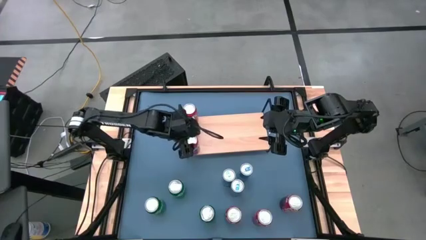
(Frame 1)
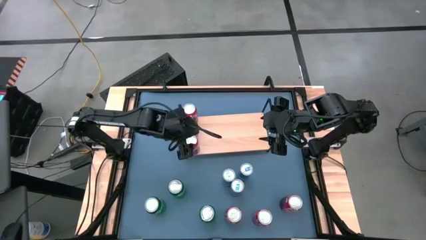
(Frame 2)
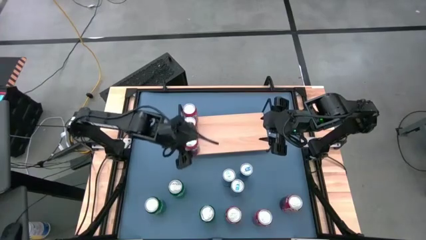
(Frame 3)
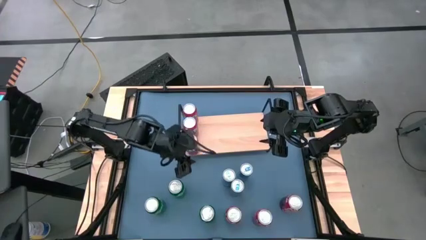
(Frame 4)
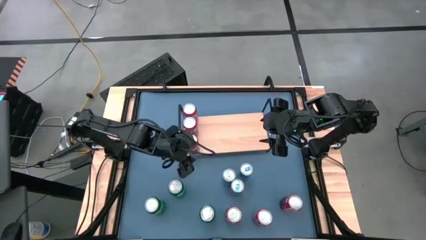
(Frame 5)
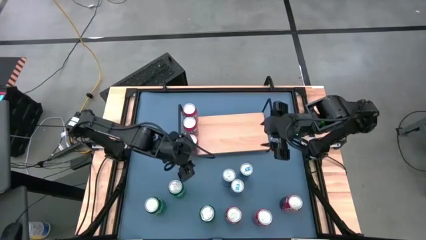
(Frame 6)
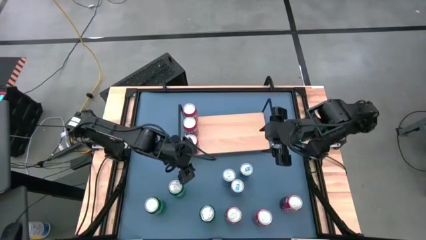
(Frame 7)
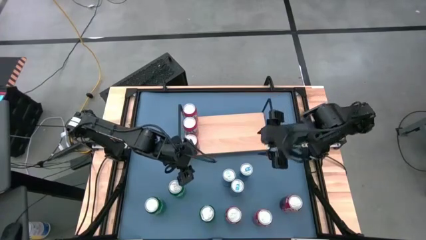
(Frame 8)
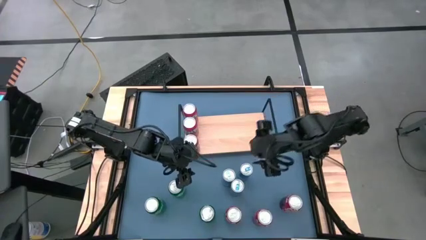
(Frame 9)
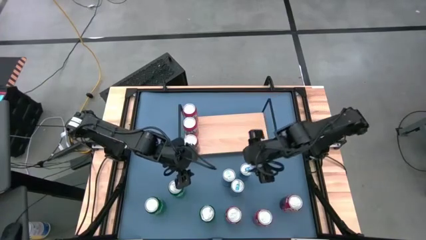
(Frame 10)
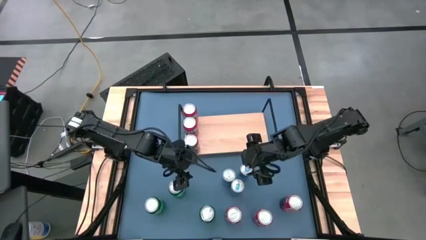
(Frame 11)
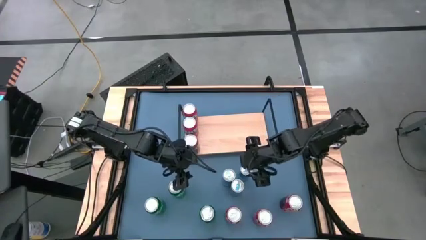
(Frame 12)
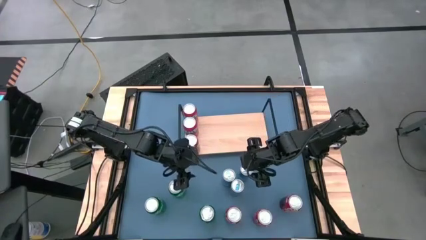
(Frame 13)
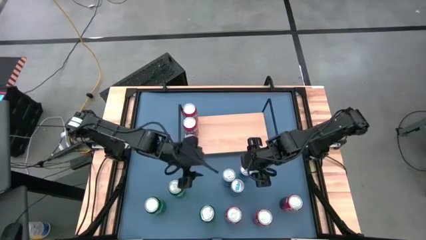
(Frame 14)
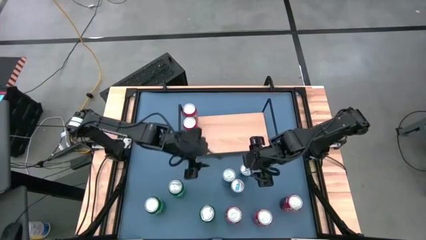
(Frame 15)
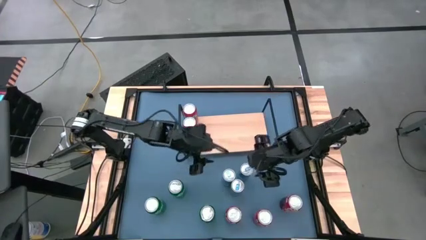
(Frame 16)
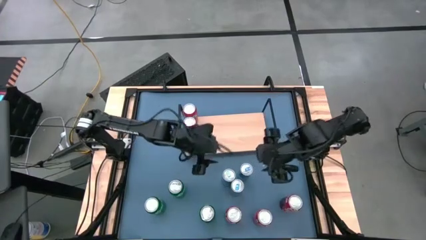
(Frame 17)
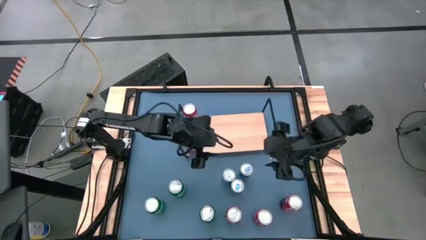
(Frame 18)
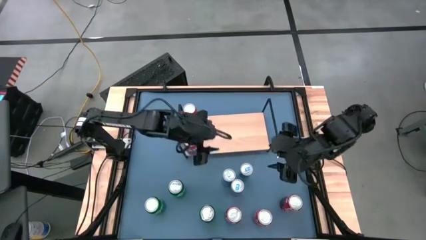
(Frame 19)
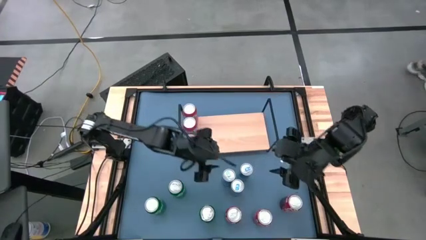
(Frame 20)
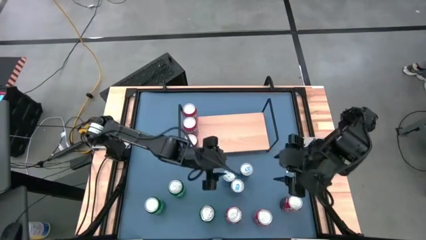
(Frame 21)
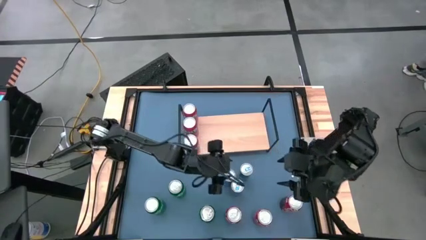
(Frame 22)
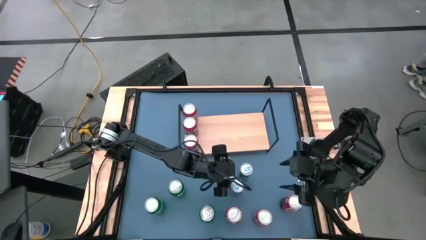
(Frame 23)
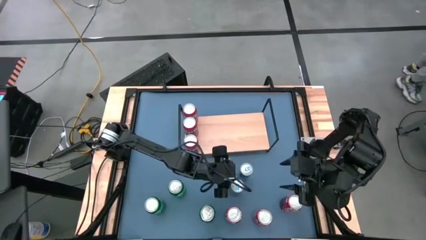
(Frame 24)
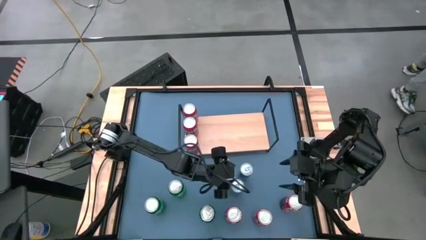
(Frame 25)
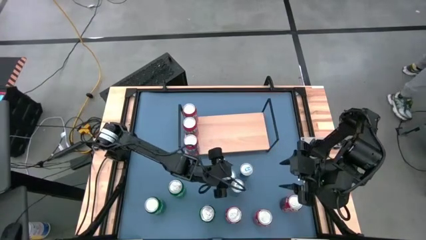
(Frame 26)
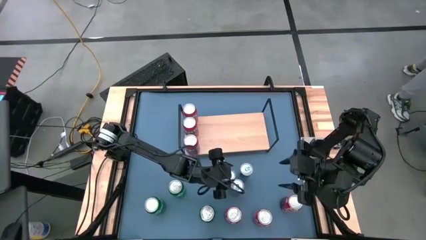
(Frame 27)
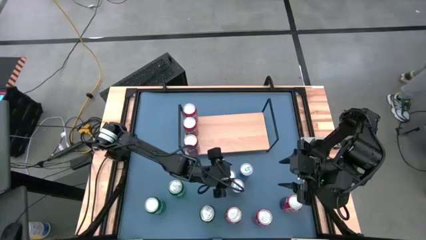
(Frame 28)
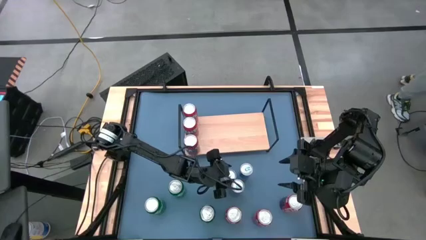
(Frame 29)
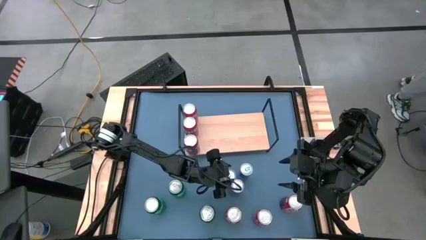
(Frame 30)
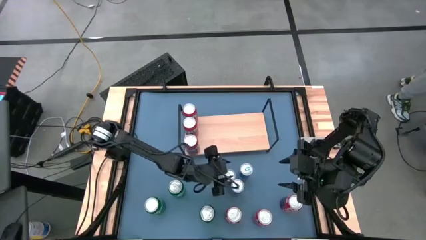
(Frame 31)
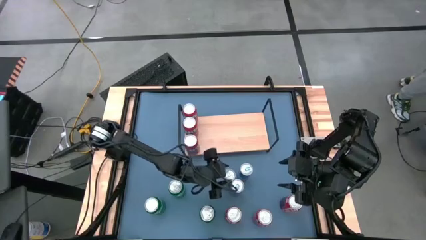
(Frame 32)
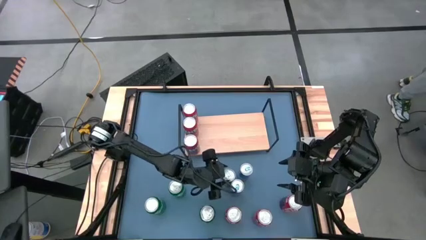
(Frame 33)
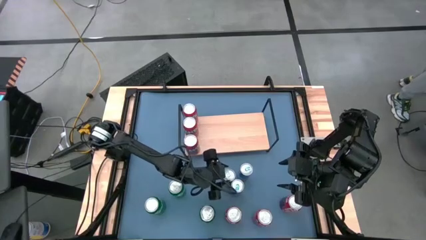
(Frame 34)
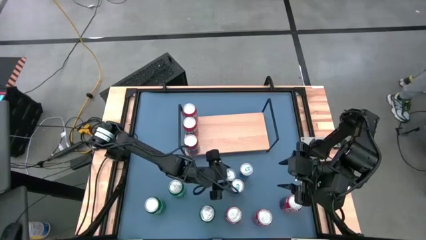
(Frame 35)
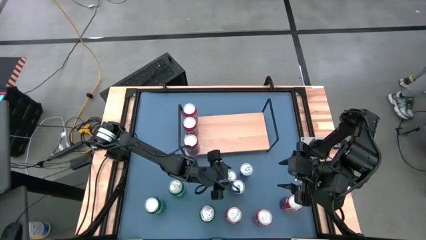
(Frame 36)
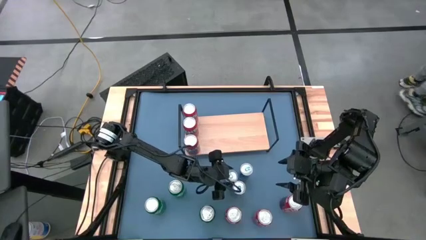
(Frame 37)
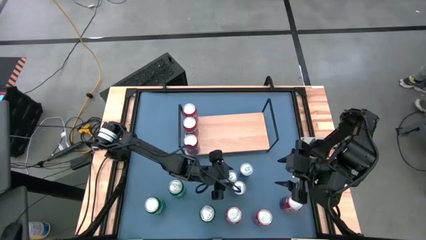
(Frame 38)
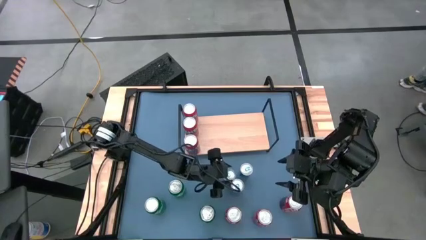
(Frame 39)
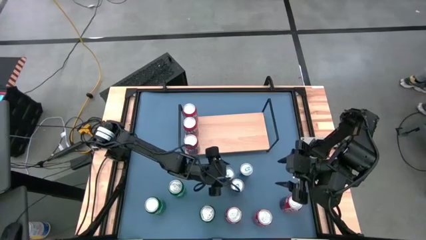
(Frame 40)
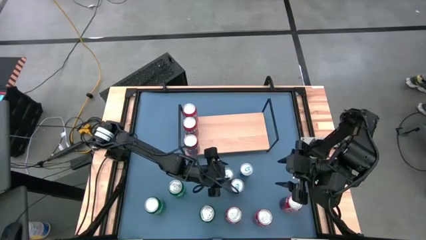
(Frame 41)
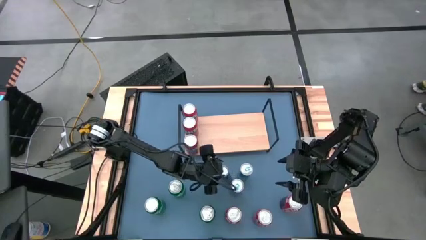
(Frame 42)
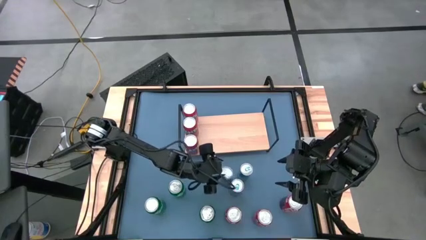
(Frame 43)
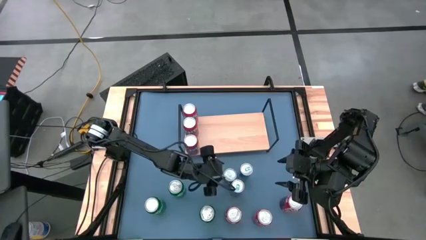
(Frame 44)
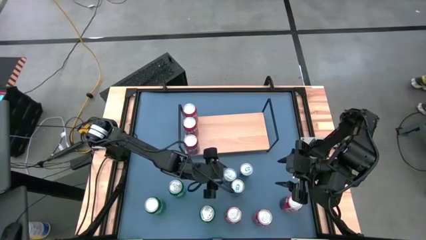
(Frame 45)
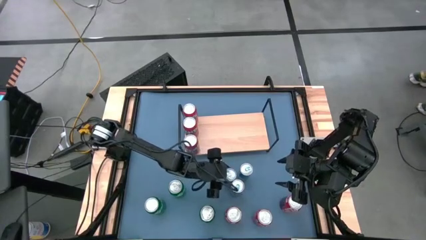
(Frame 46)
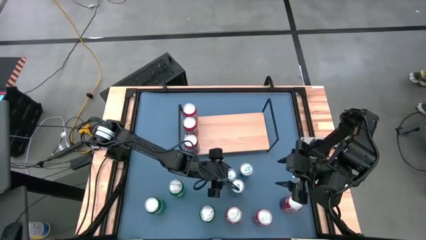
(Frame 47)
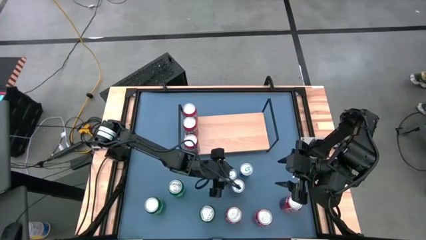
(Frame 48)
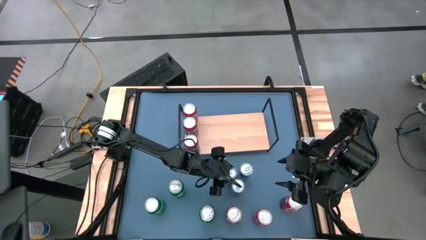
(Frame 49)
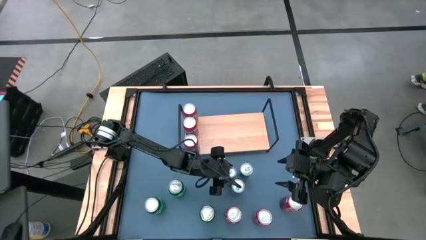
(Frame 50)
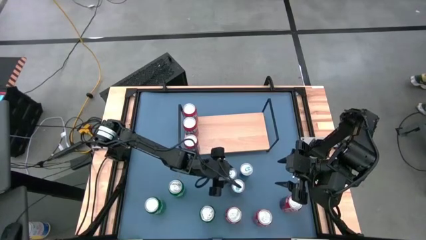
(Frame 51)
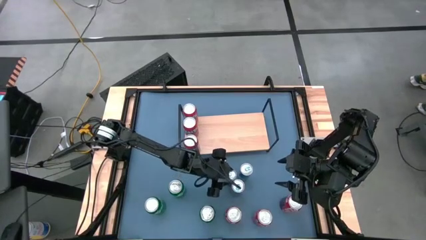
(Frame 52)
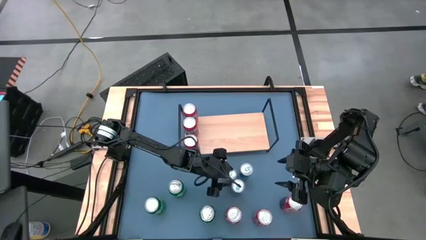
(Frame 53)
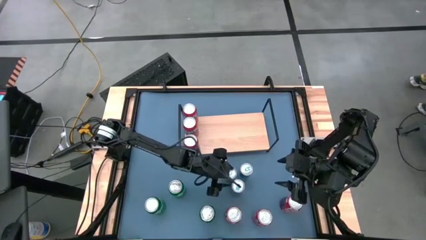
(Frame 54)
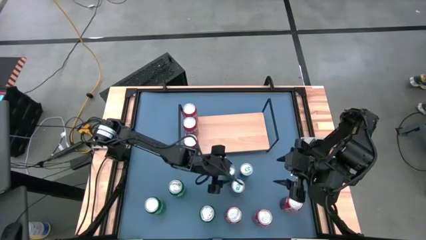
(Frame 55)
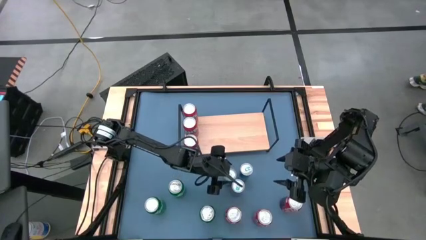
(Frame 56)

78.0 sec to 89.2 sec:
Task: Place canned beverage on shelf
Put the blue soda can on the shelf
